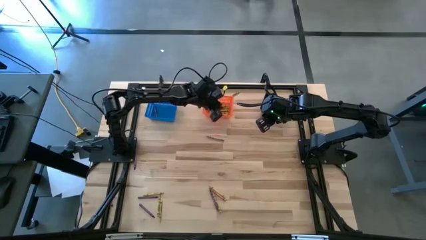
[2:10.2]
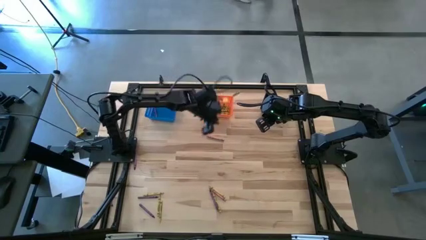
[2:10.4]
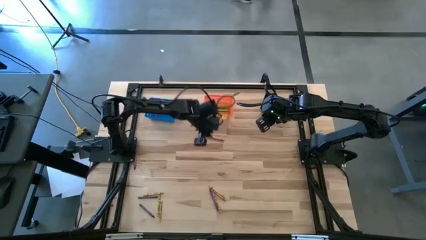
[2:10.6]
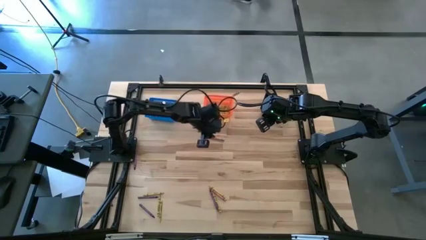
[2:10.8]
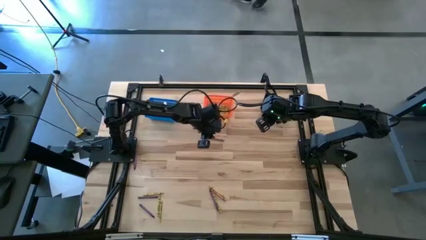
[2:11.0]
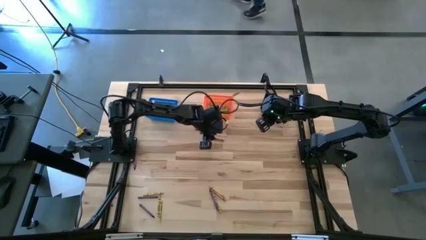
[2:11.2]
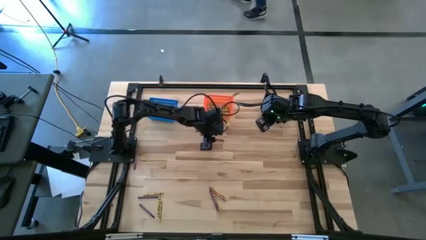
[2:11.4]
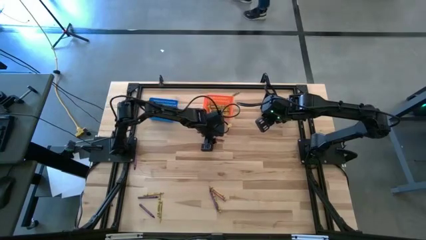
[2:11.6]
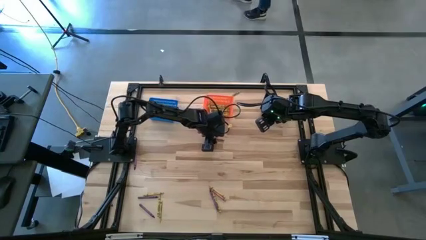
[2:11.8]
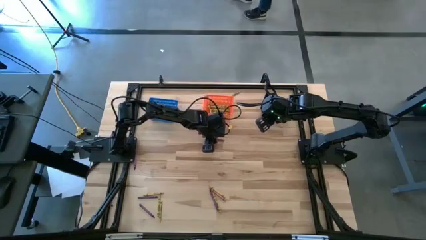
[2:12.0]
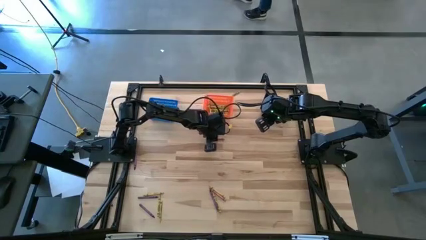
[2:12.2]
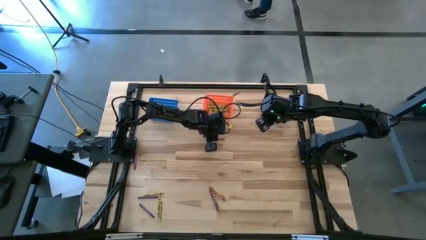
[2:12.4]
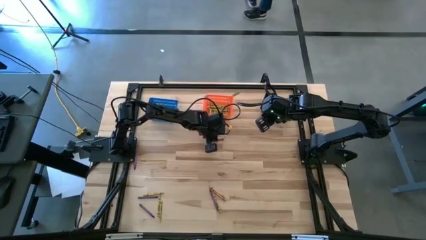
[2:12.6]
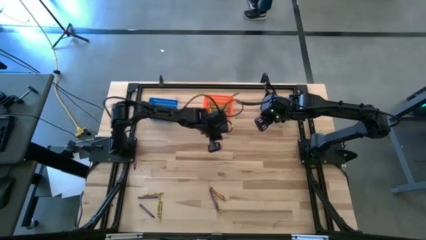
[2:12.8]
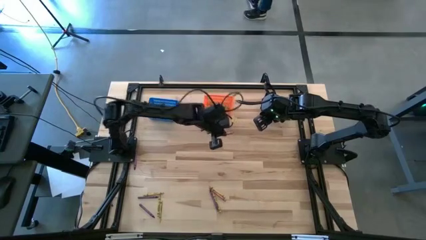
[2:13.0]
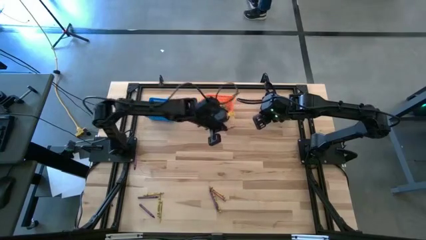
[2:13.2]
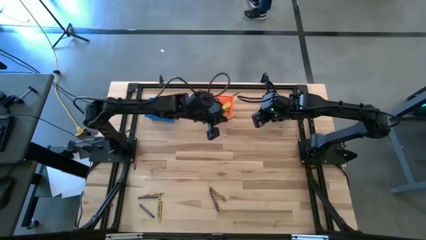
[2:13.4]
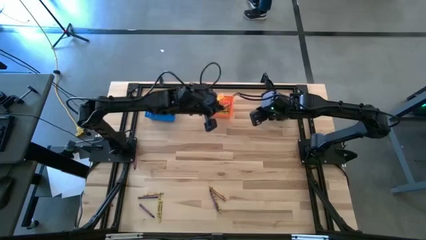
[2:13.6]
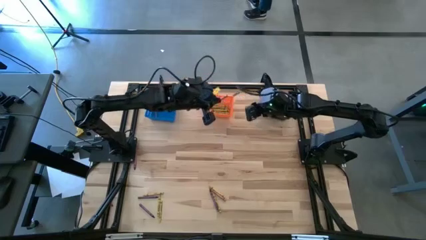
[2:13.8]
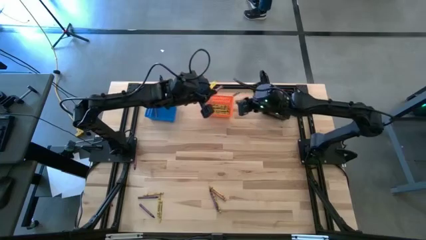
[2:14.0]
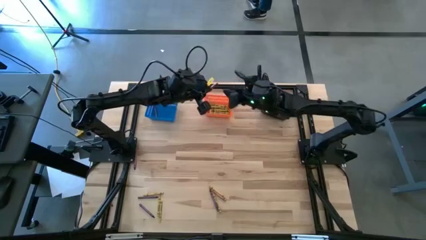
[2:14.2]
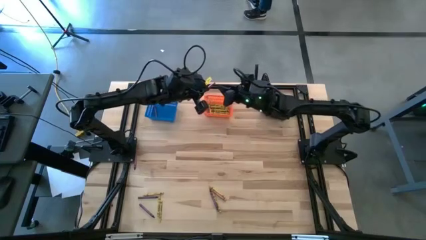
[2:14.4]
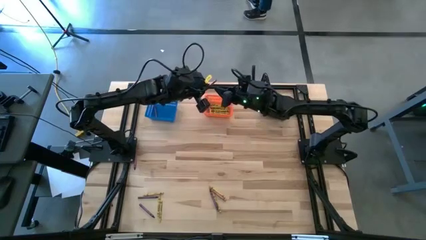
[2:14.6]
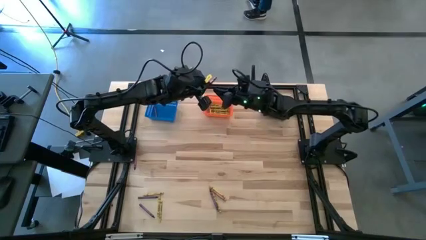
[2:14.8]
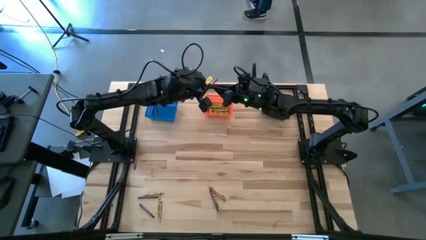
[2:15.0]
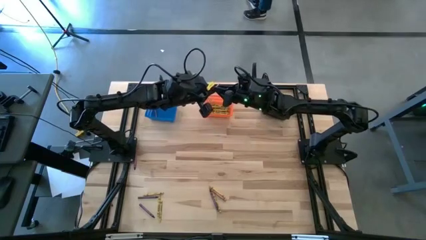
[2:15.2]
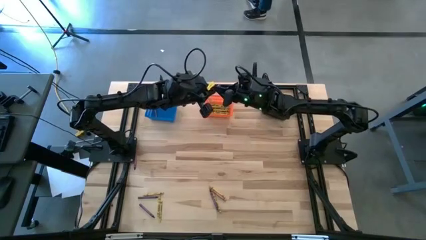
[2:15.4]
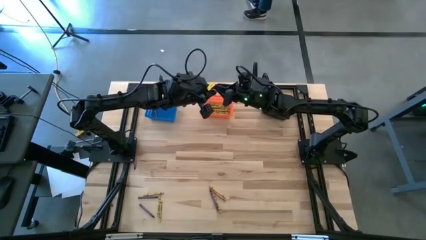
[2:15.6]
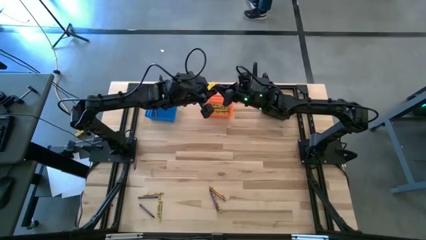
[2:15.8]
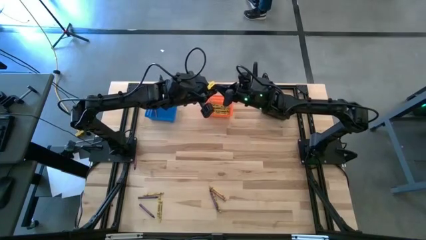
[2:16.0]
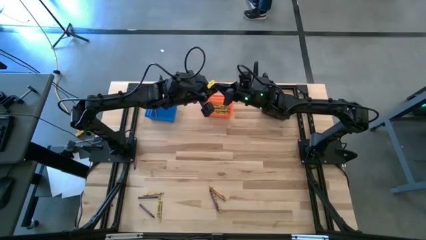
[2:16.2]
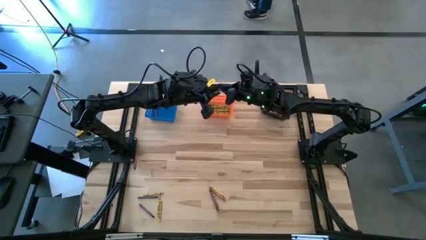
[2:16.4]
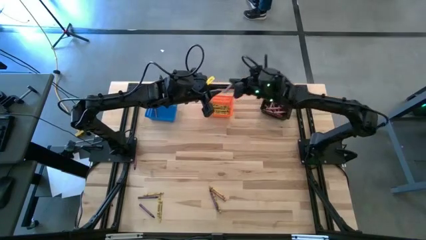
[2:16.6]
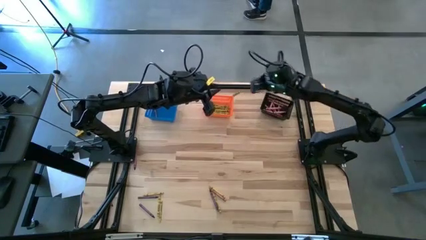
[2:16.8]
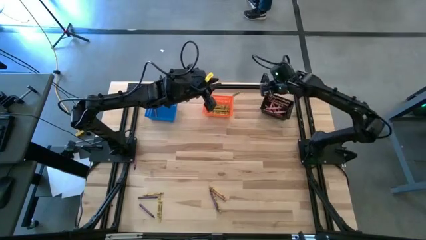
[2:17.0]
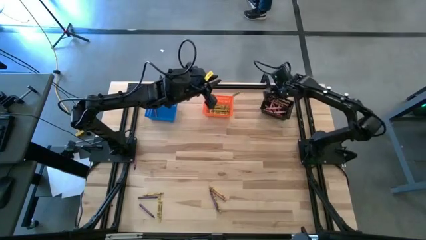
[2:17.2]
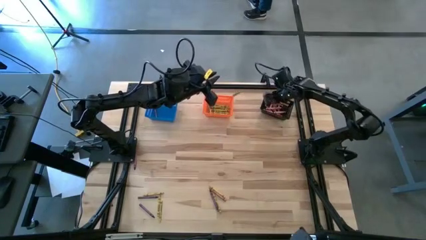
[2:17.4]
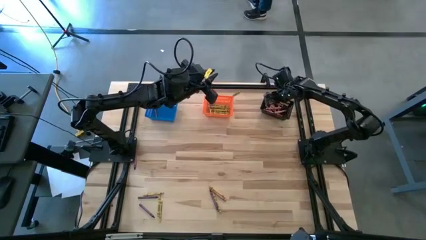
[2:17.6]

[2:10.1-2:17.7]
Task: Sort crayons
Put the top red crayon into the black bin

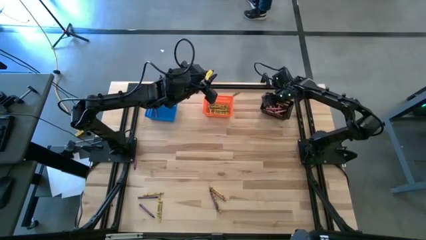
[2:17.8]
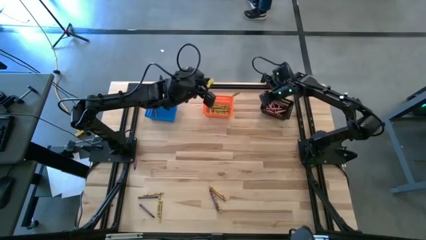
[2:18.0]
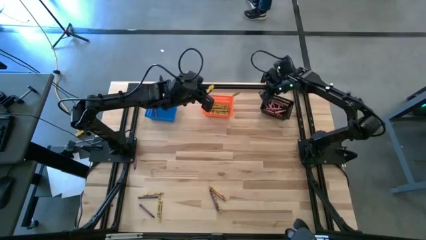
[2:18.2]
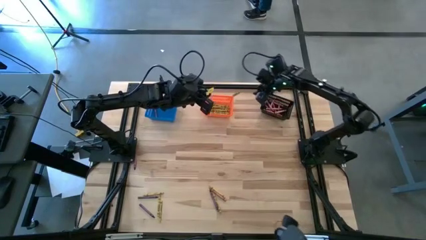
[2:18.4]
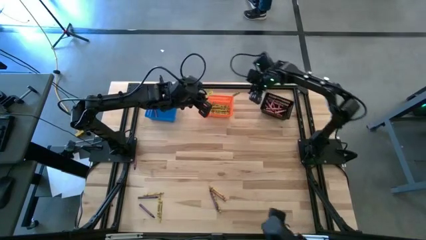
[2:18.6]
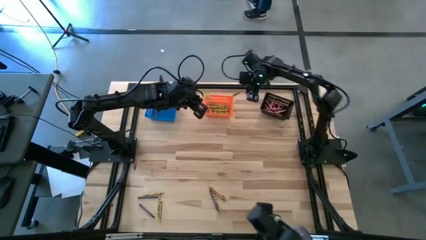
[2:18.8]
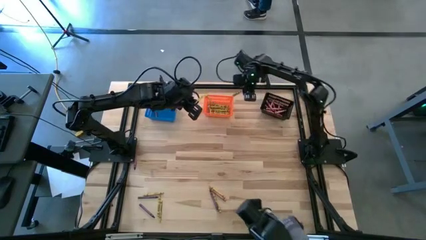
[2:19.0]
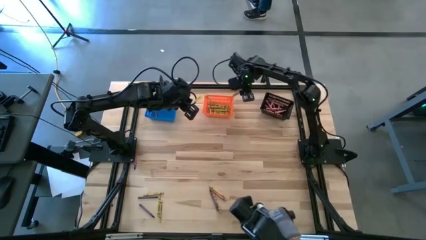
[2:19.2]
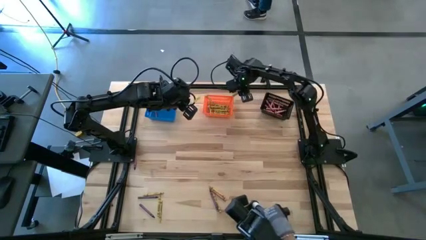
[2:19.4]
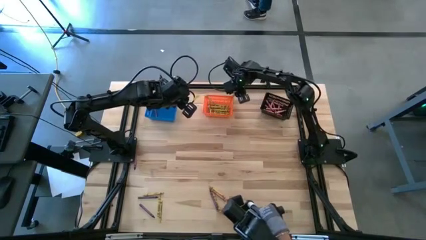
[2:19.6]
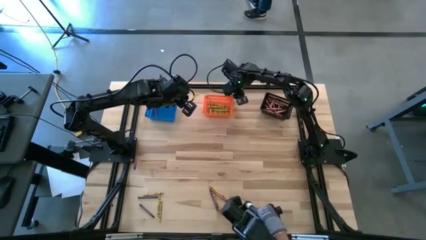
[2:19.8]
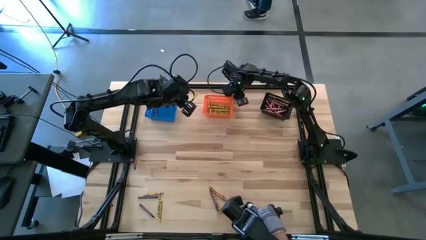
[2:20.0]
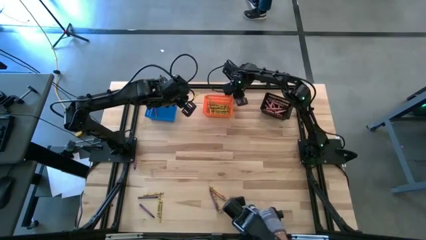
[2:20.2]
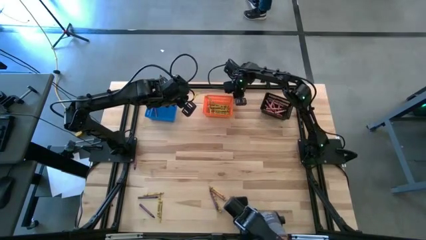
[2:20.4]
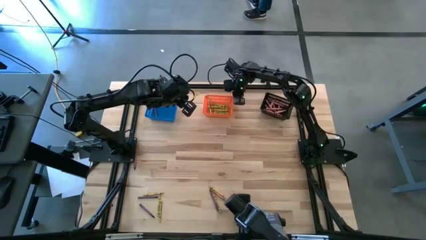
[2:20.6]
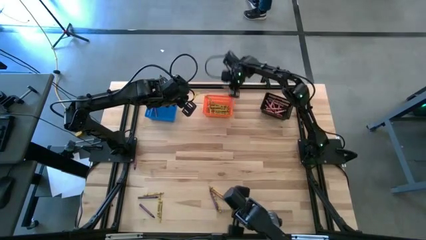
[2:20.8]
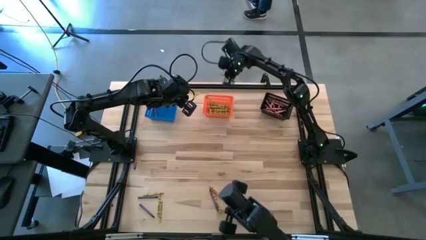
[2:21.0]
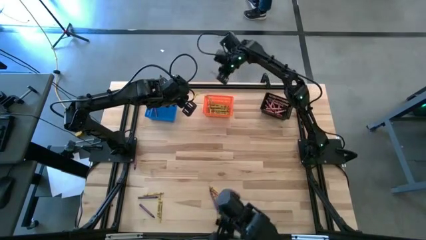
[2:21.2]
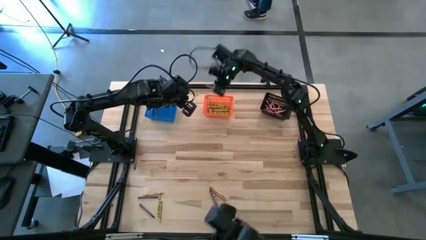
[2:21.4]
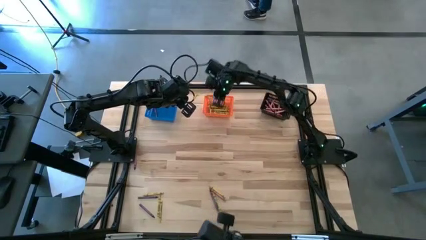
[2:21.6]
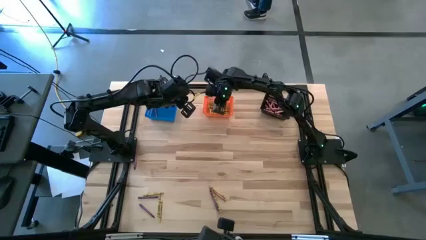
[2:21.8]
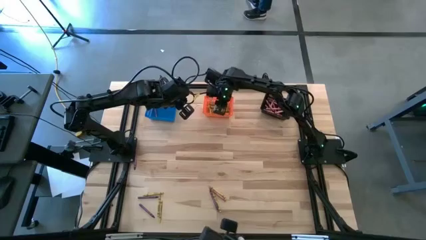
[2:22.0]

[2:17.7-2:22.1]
Put the yellow crayon into the orange bin

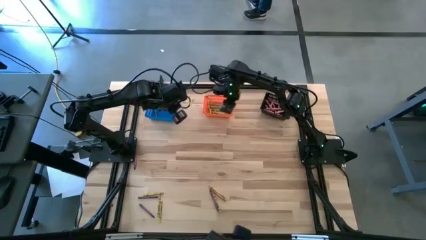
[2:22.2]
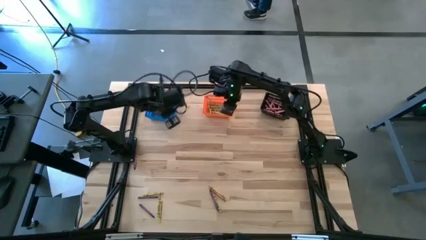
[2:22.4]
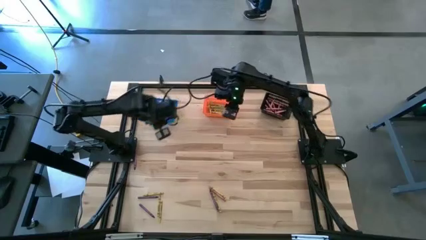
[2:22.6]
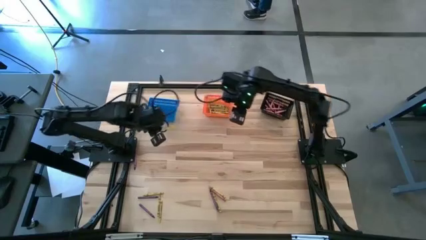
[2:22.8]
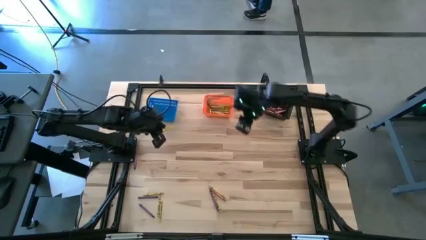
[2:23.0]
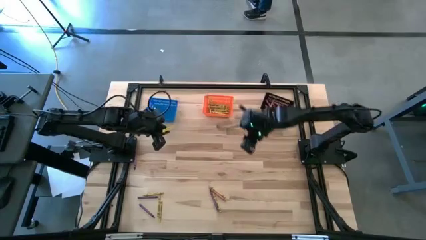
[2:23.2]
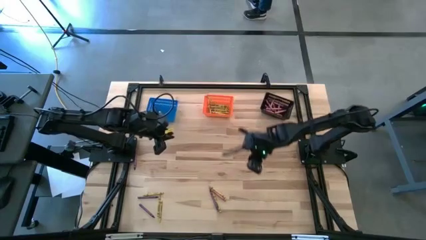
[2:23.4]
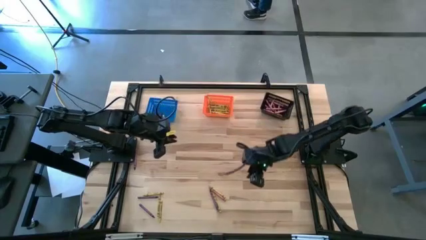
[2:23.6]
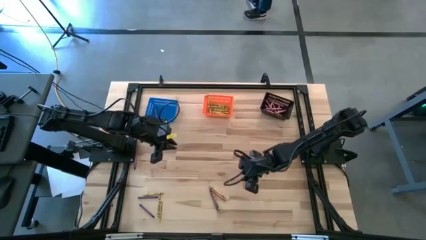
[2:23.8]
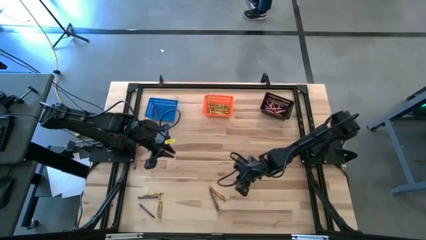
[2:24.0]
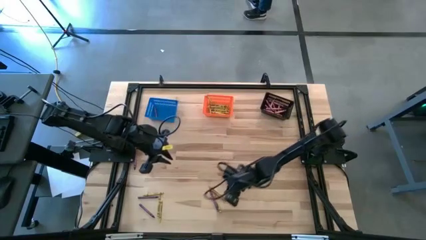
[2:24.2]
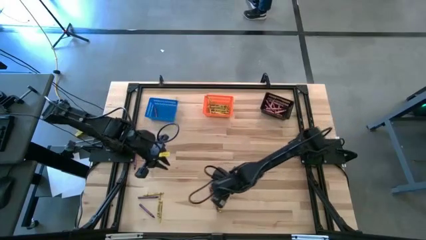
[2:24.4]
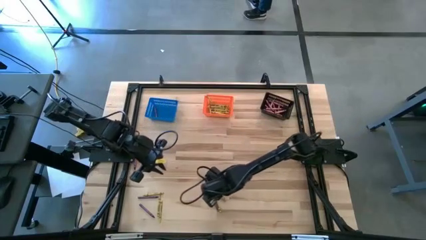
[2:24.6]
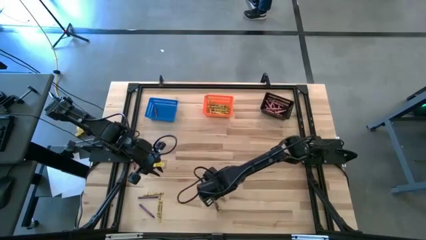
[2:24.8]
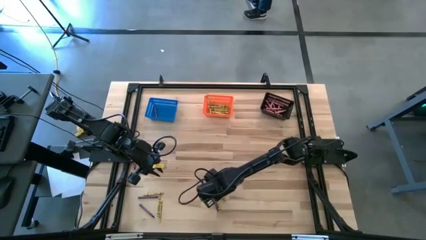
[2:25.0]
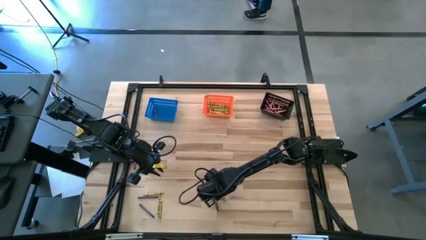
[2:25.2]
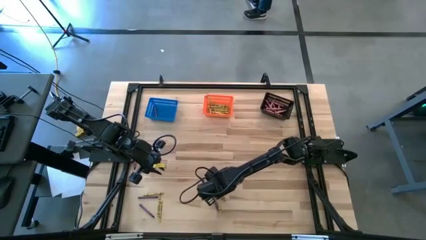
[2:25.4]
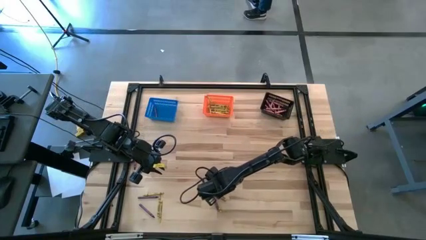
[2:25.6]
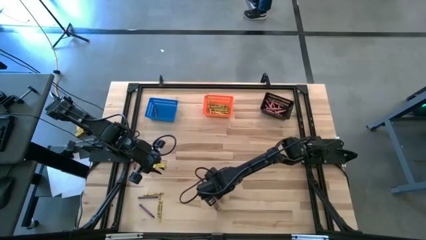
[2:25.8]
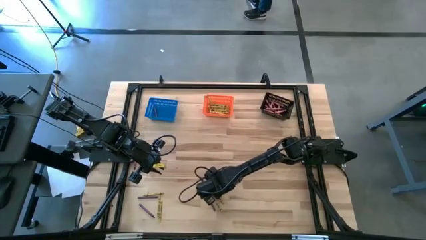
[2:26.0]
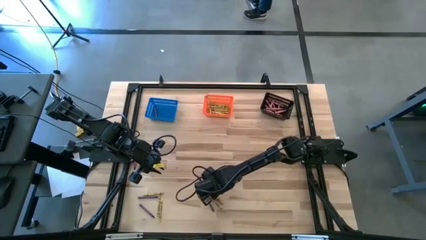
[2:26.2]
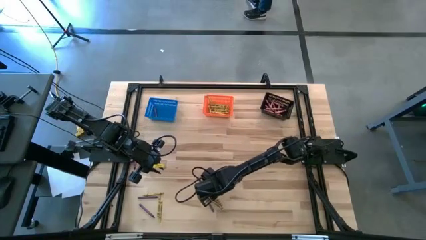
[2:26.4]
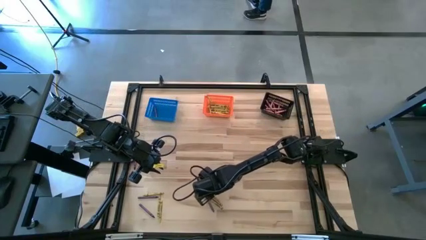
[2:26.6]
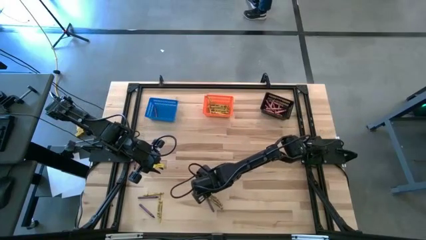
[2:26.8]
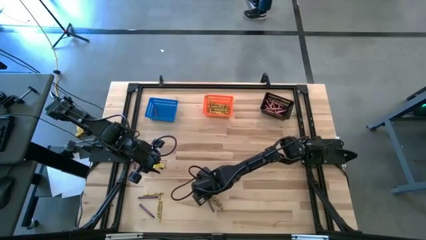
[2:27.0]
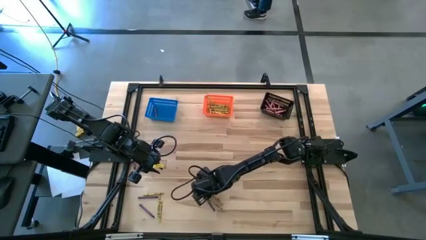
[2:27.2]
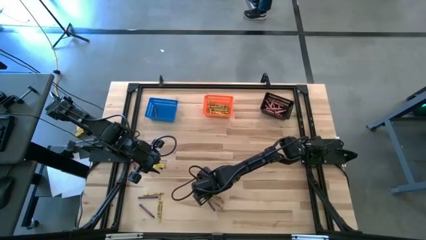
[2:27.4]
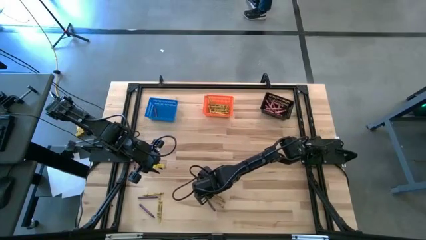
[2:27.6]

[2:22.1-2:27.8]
Put the yellow crayon into the orange bin
